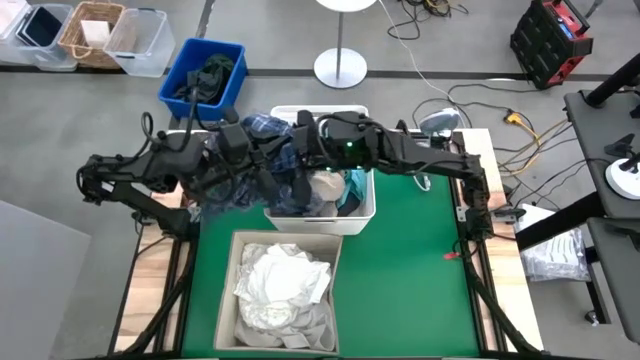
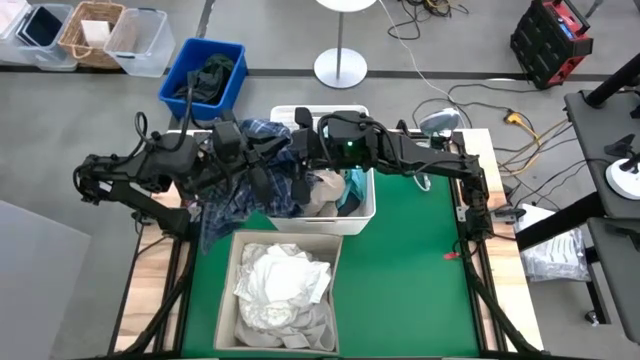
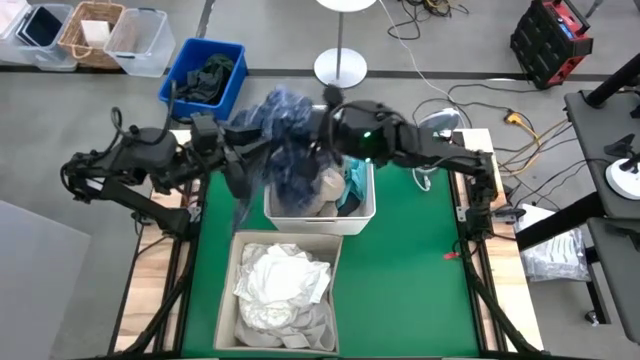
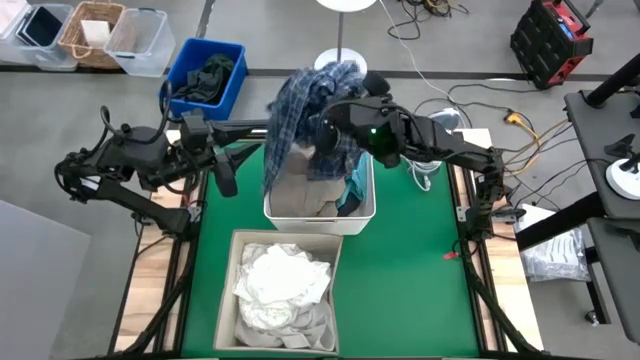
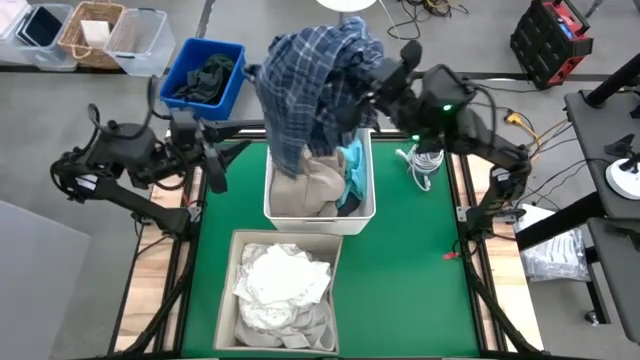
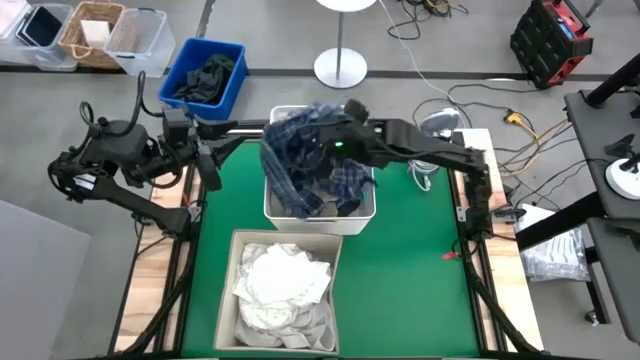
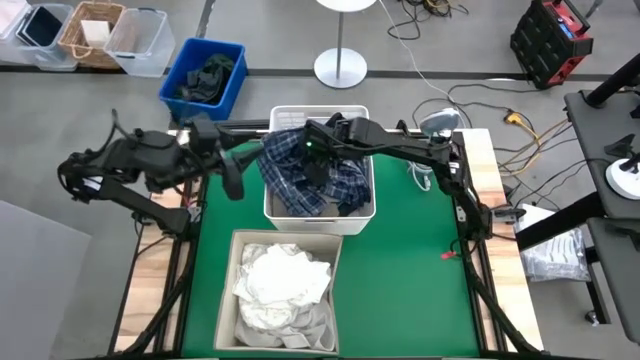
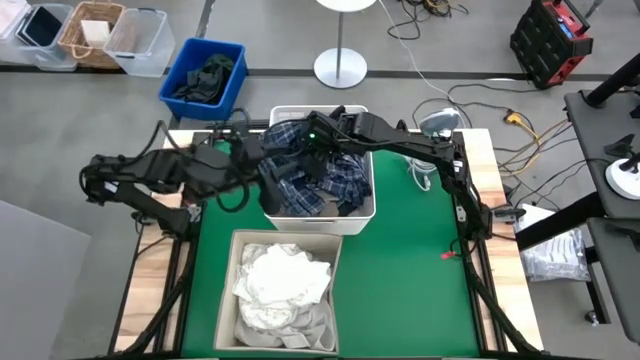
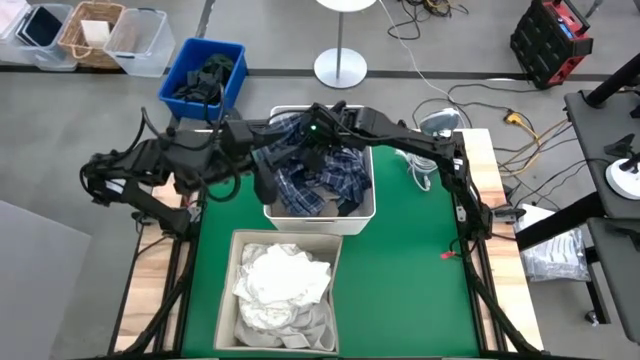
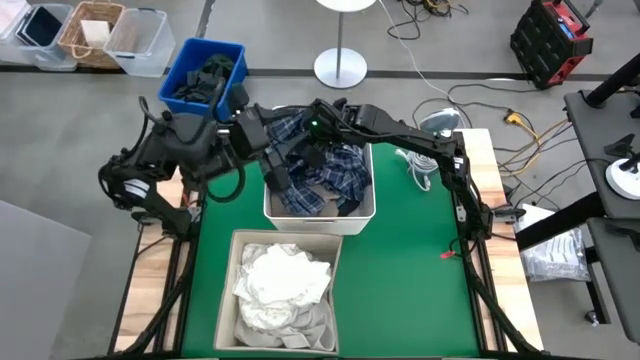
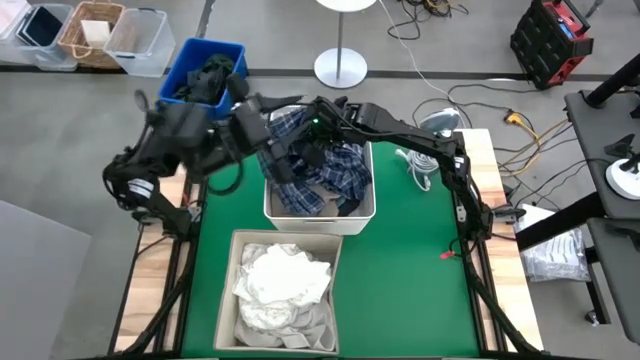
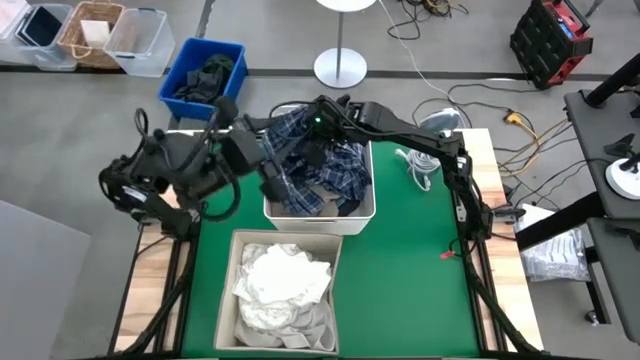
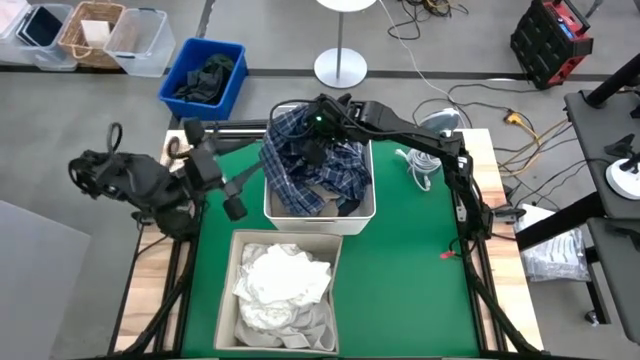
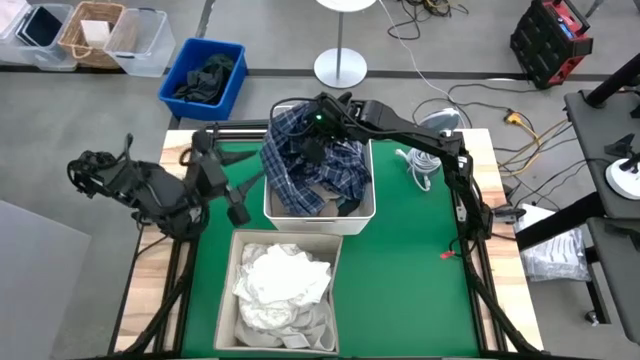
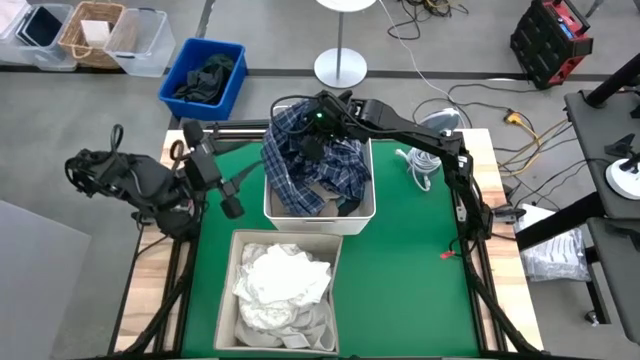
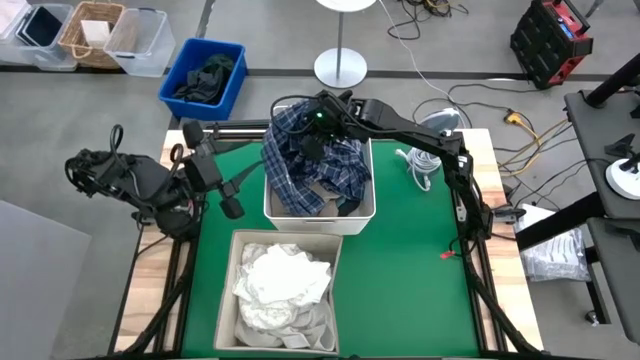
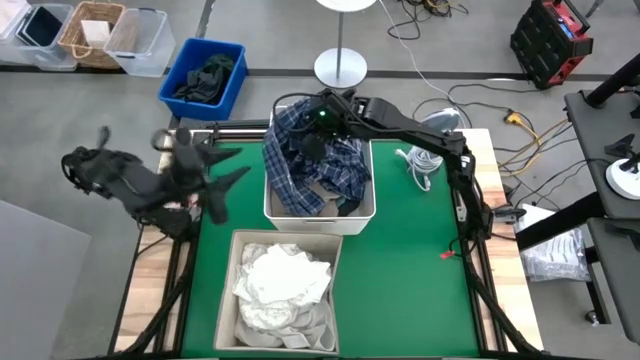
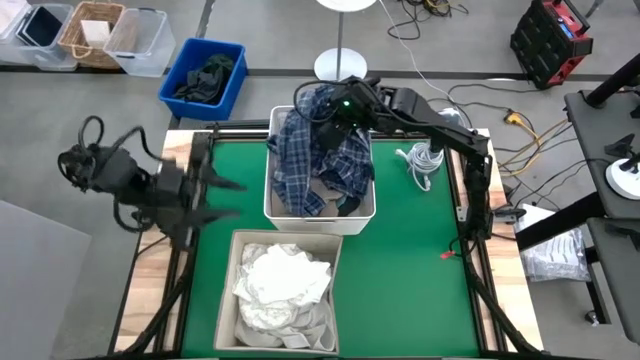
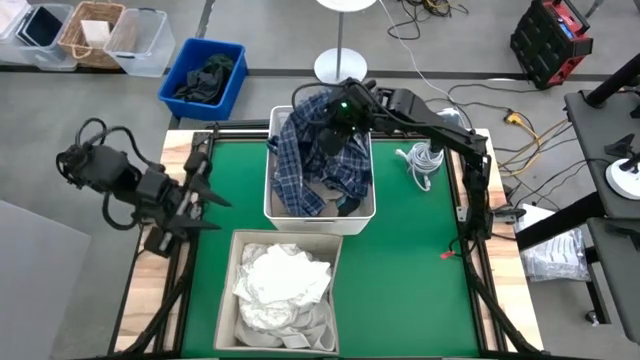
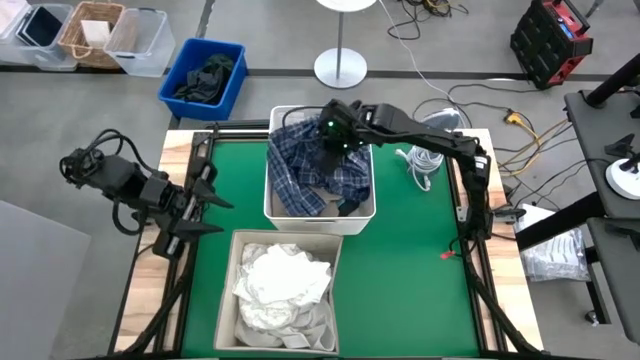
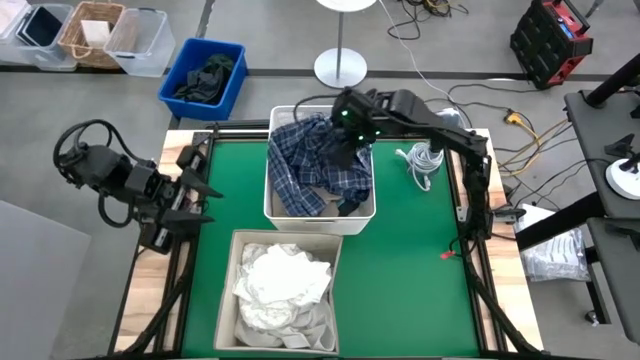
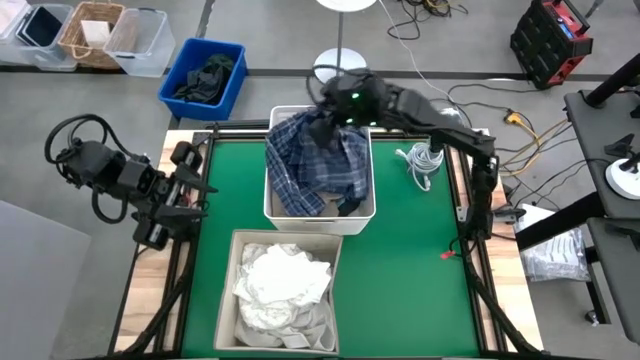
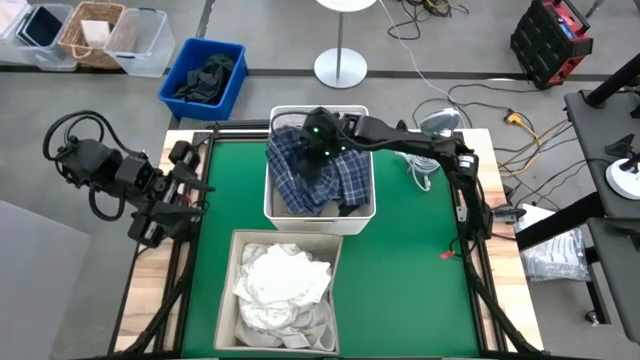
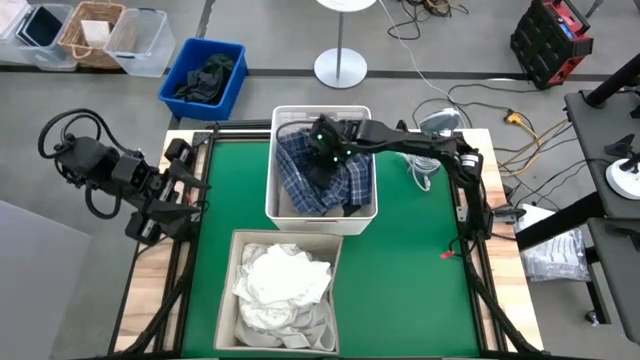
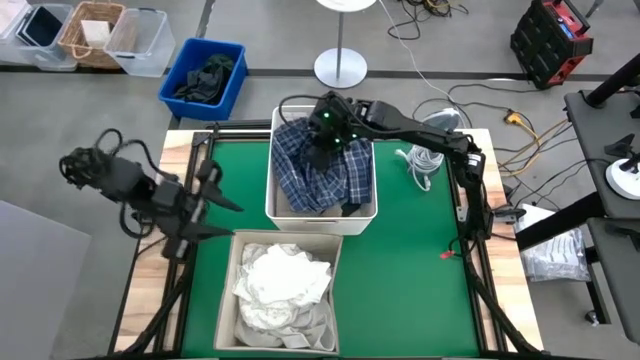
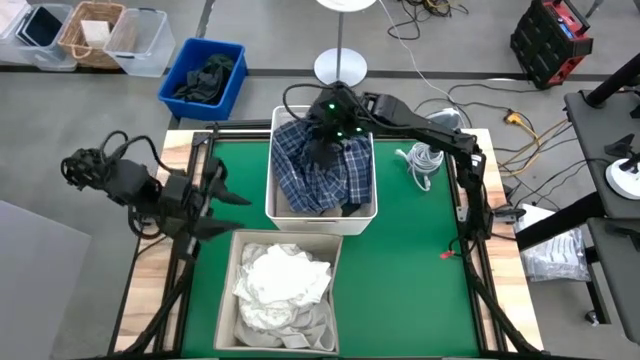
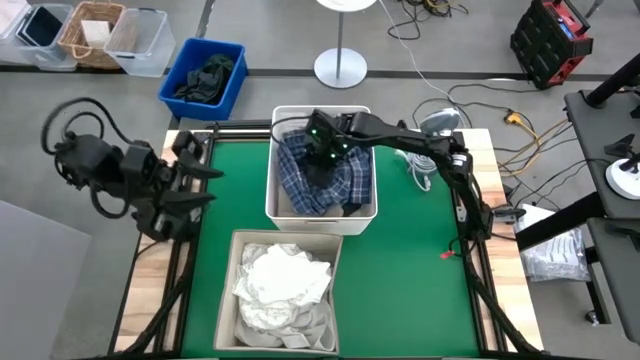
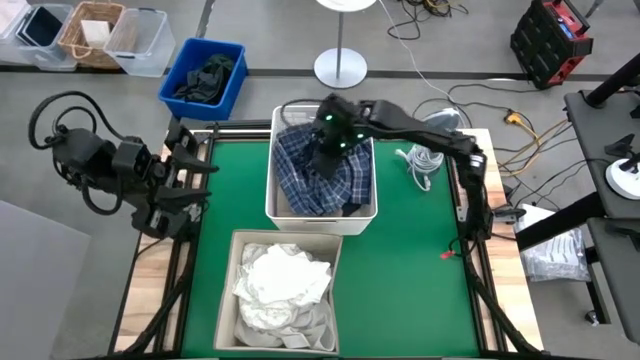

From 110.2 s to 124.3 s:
Task: Sort clothes
Put the blue patterned polo shirt into the white bin

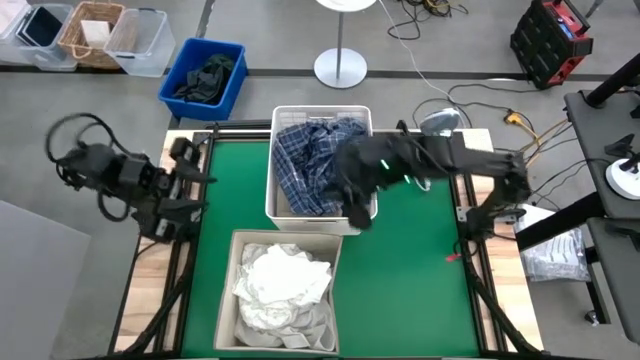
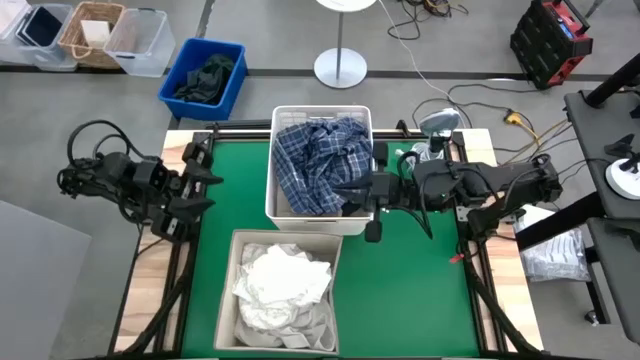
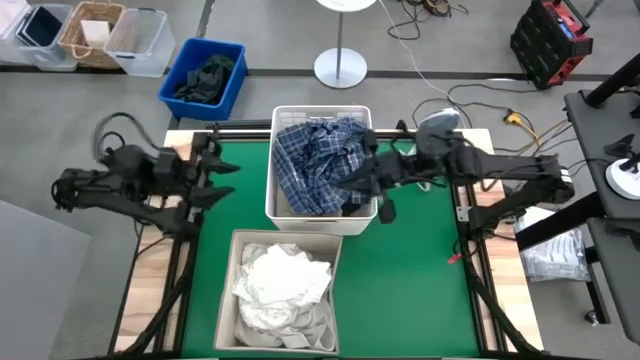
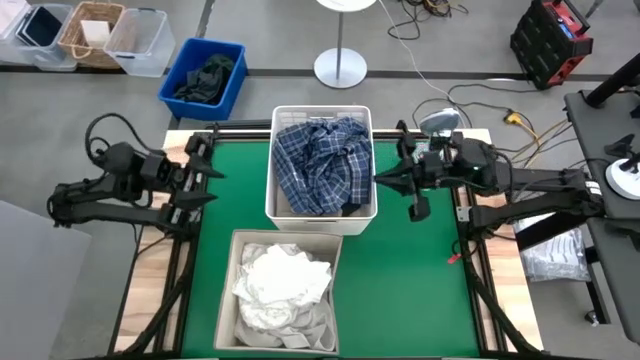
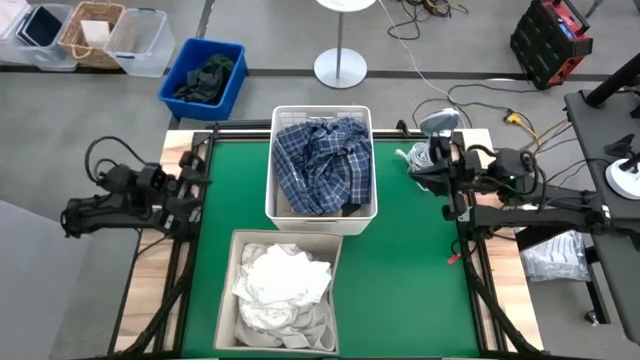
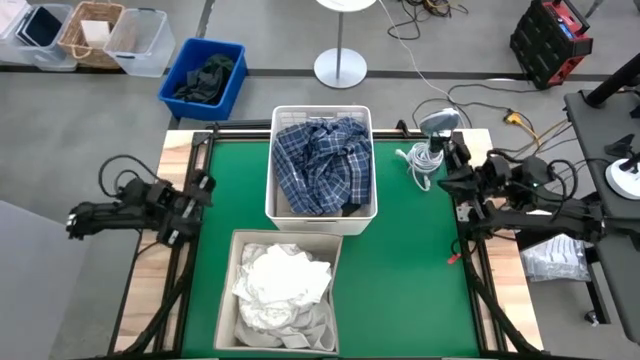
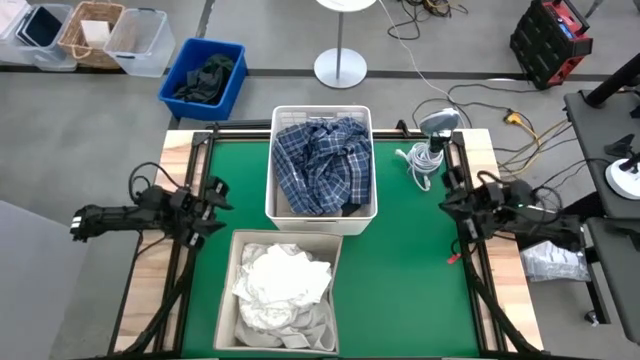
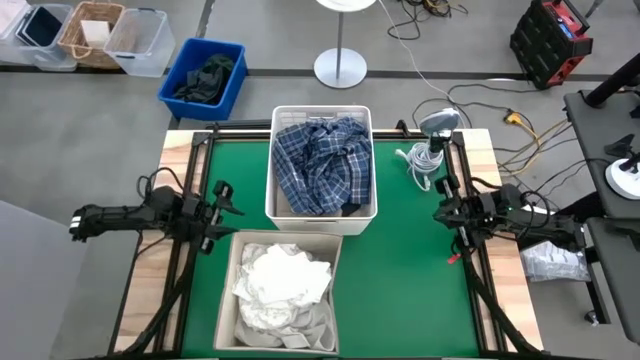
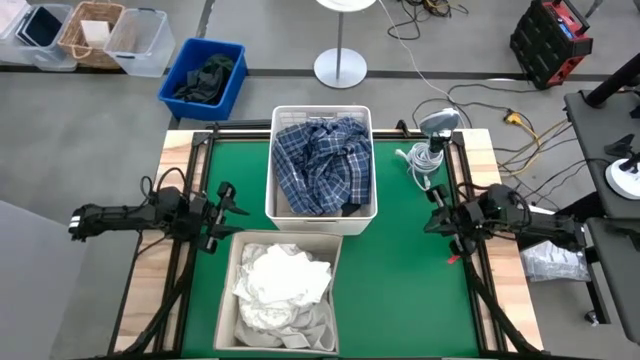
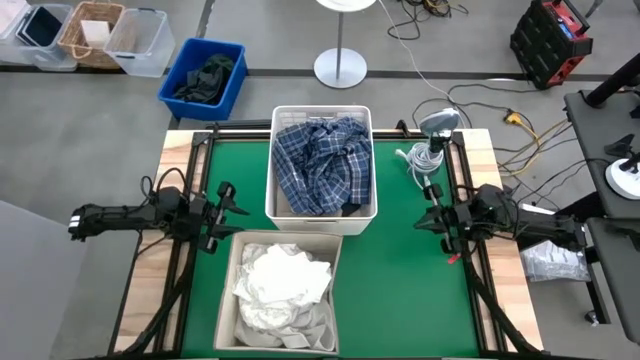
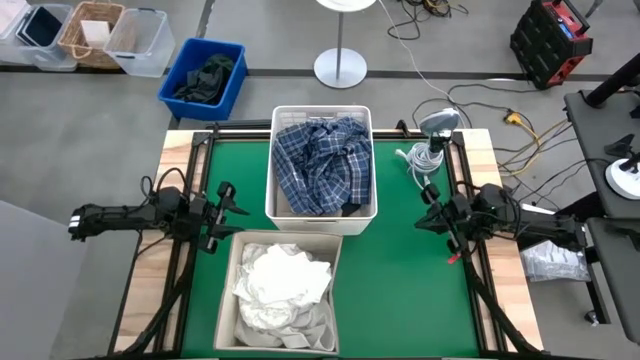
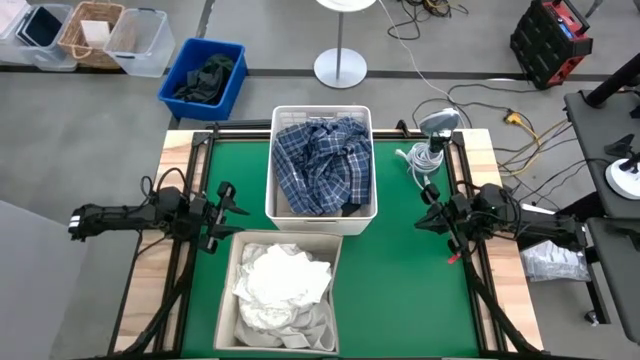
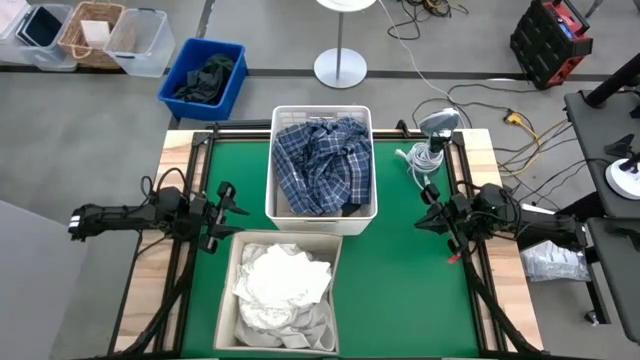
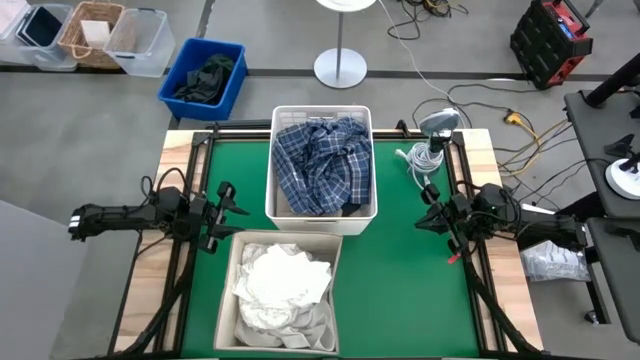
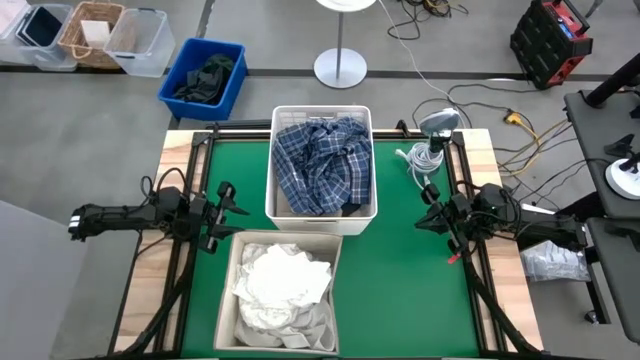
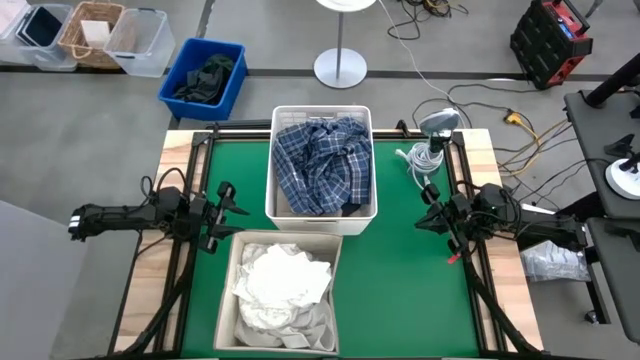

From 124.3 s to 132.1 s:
Return to Home Position
